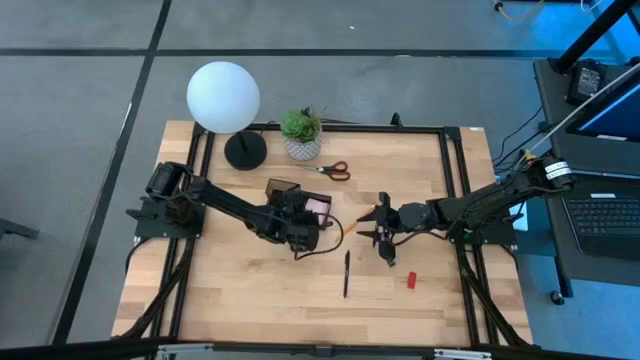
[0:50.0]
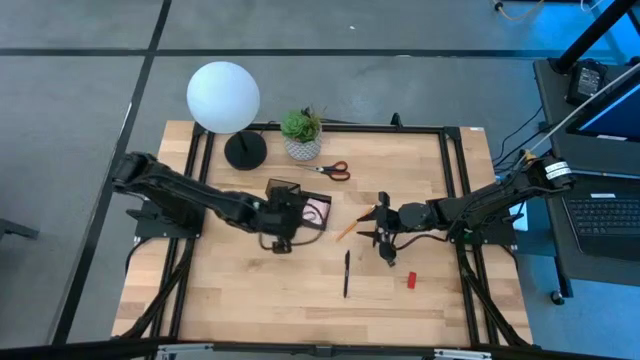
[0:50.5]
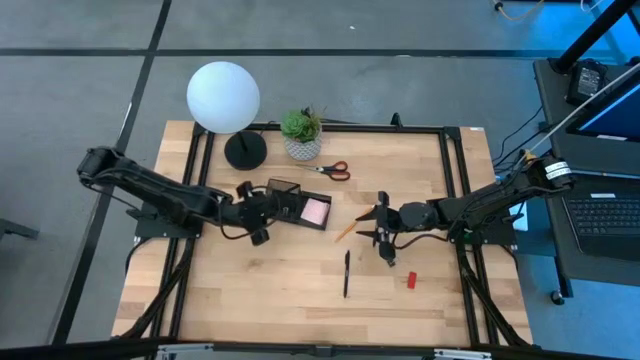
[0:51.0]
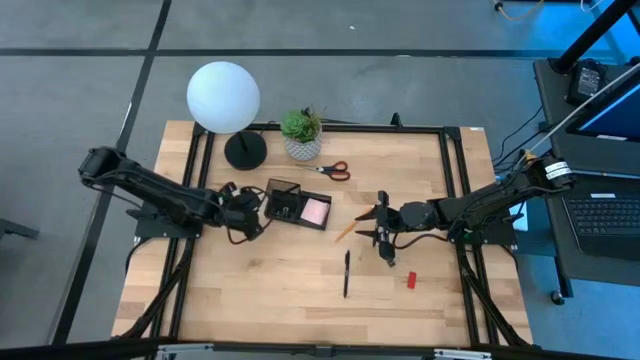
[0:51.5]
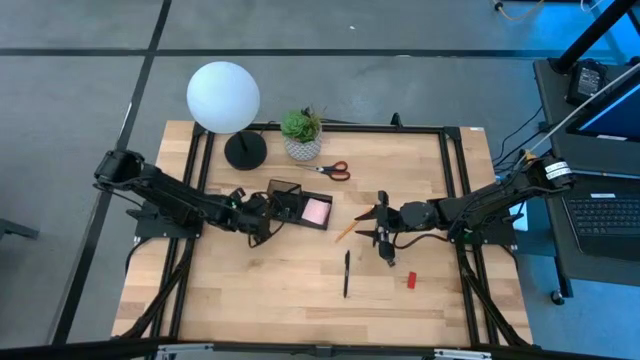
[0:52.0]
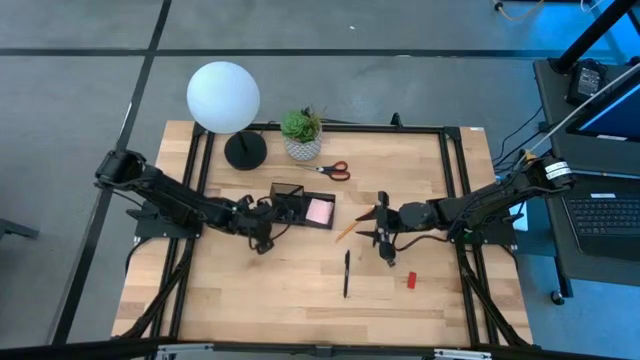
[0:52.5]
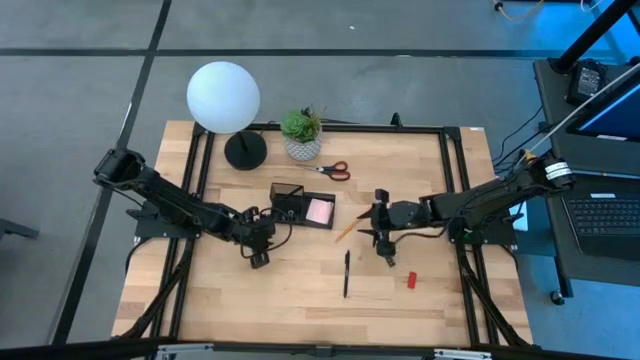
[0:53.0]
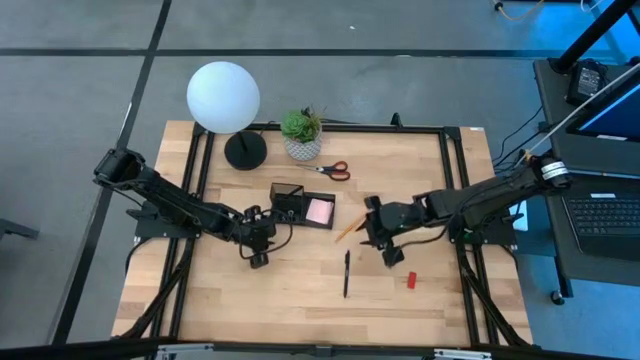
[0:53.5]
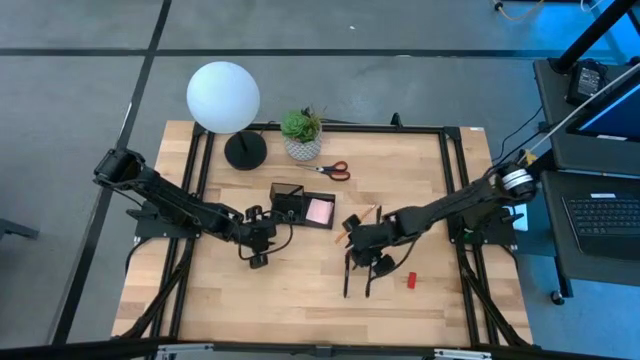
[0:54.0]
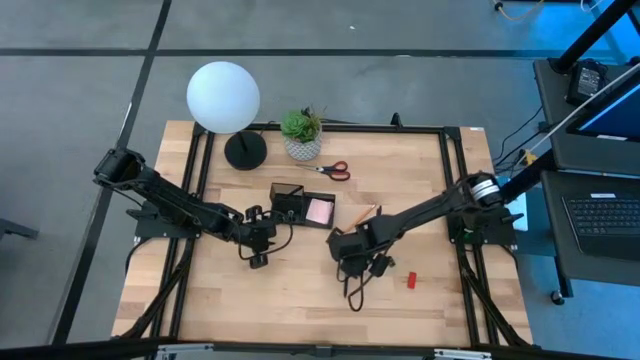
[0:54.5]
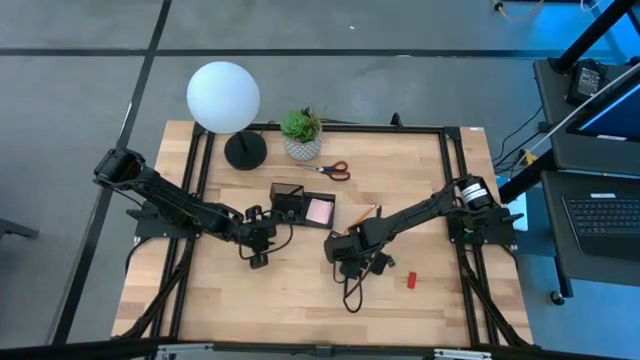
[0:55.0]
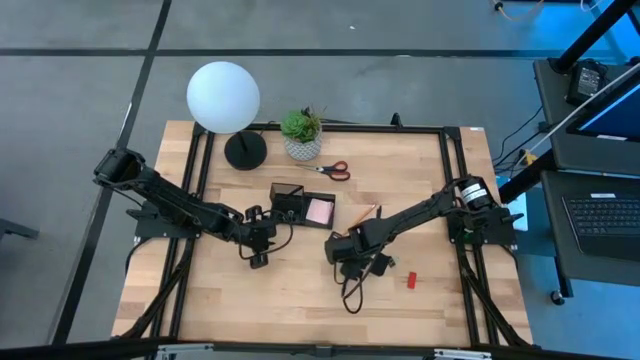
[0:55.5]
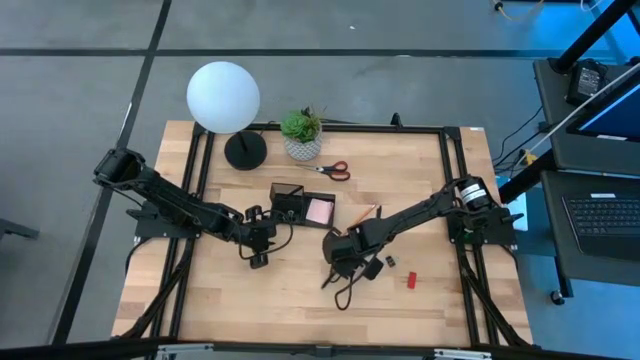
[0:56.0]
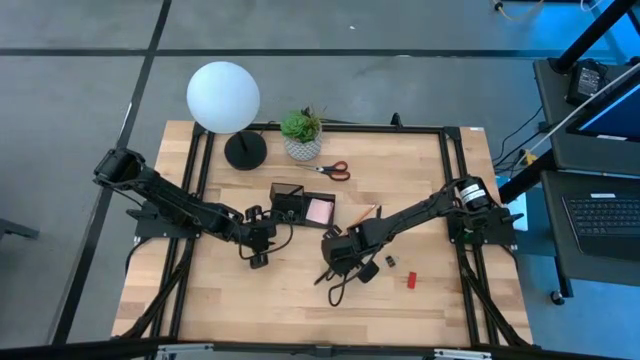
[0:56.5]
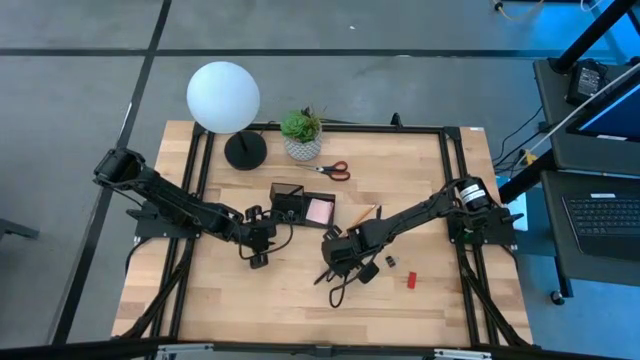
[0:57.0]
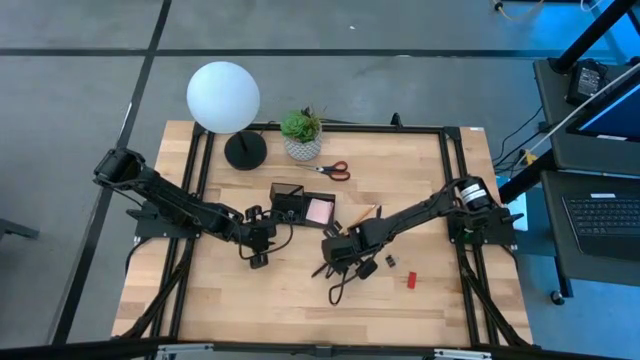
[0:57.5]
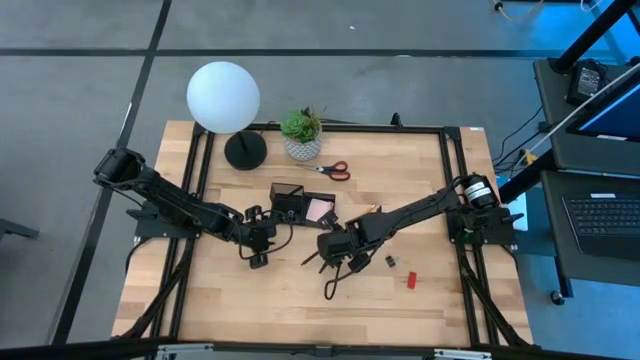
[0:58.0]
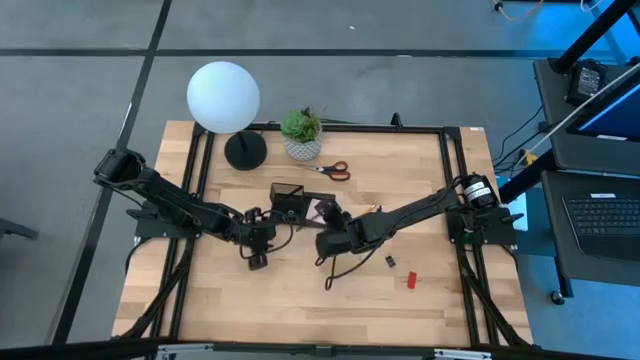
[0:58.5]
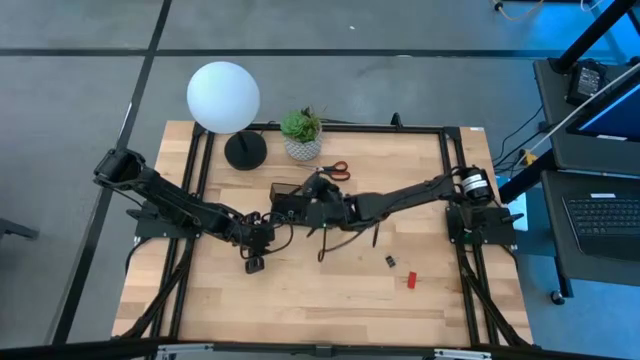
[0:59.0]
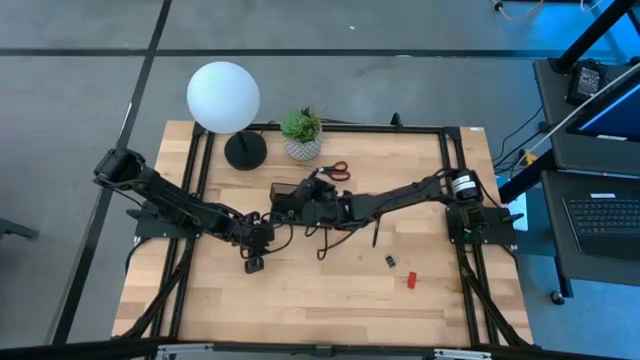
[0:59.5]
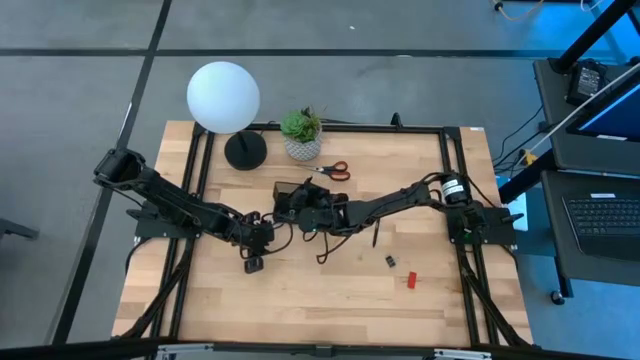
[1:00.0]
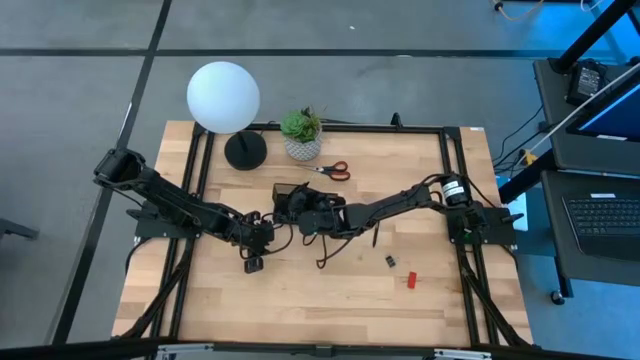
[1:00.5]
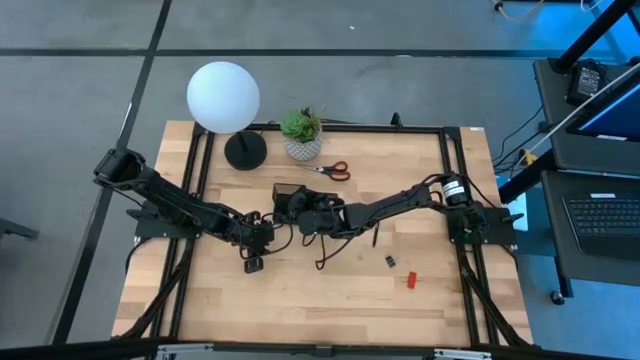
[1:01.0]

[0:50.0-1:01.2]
Task: Pick and place office supplies into organizer
Put the black pen into the black desk organizer

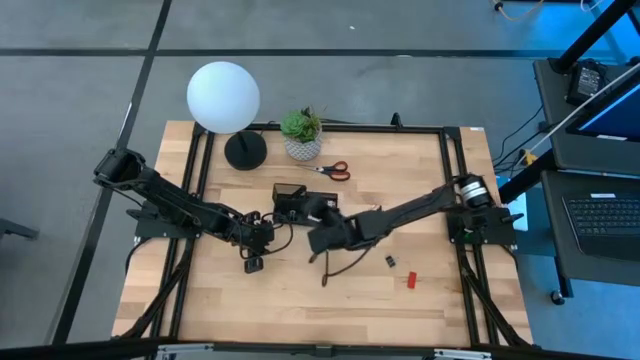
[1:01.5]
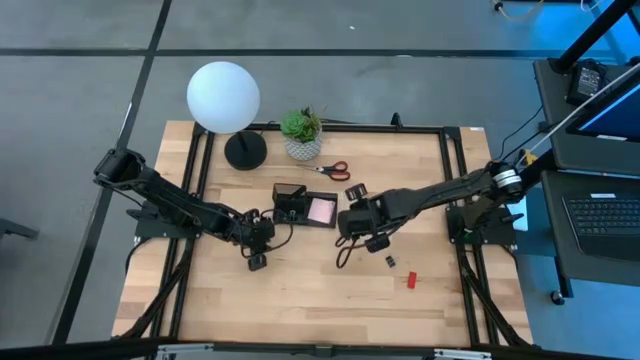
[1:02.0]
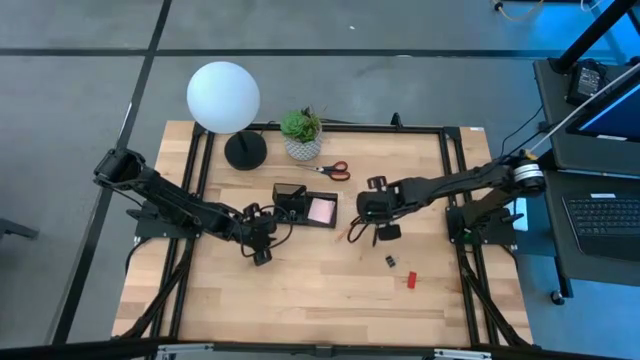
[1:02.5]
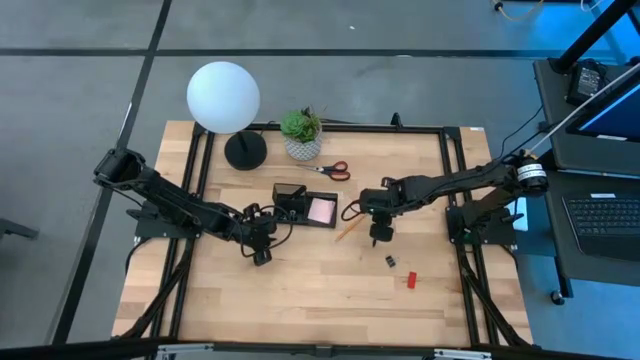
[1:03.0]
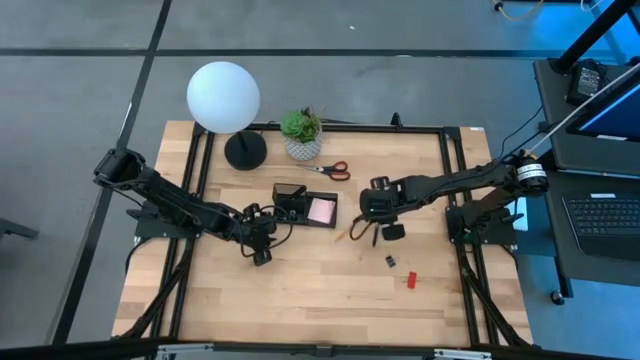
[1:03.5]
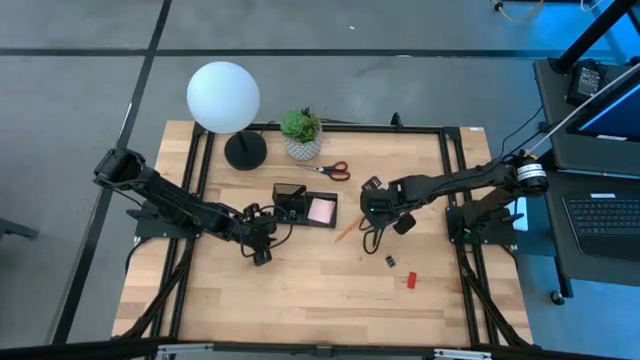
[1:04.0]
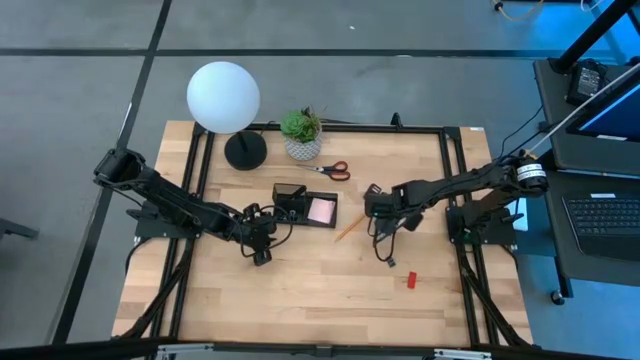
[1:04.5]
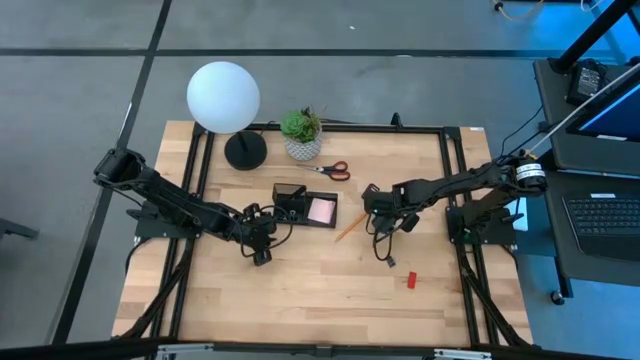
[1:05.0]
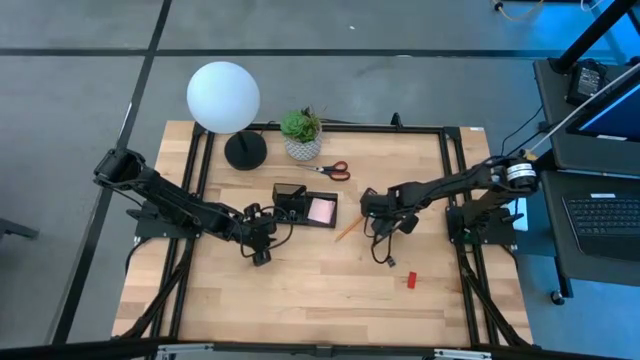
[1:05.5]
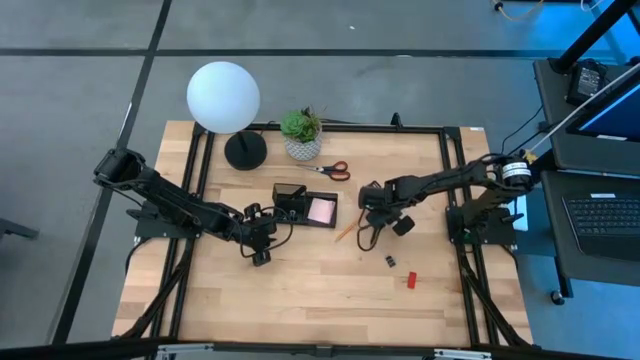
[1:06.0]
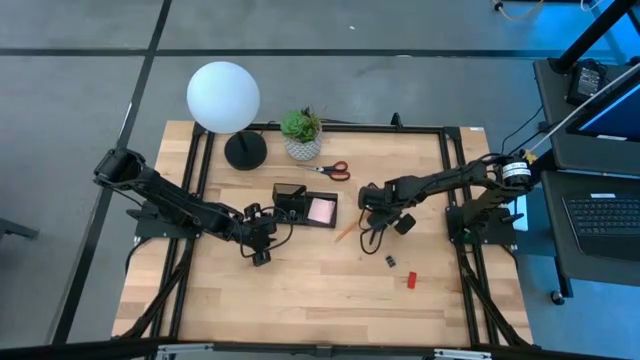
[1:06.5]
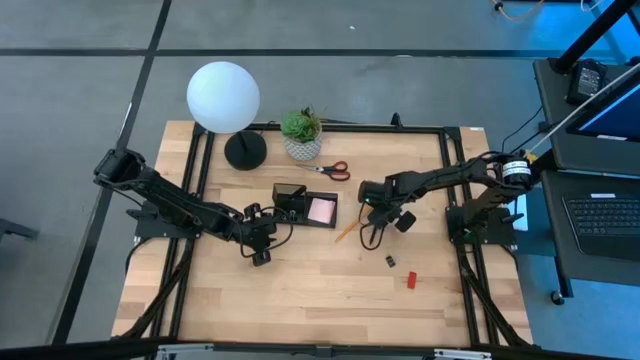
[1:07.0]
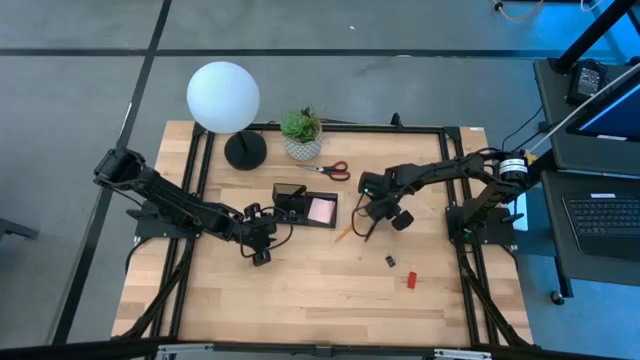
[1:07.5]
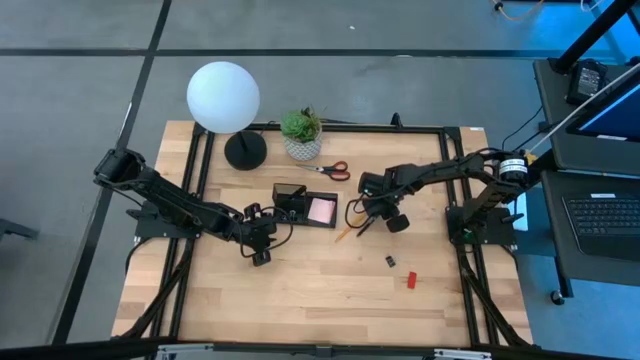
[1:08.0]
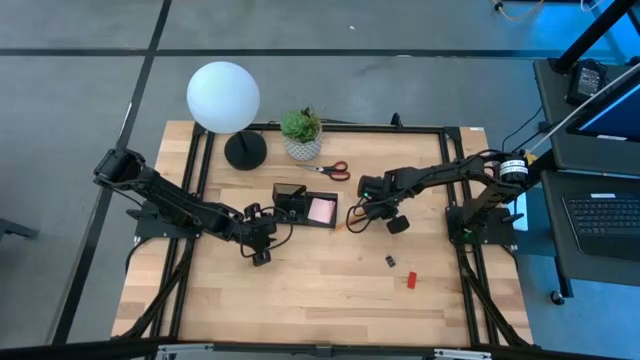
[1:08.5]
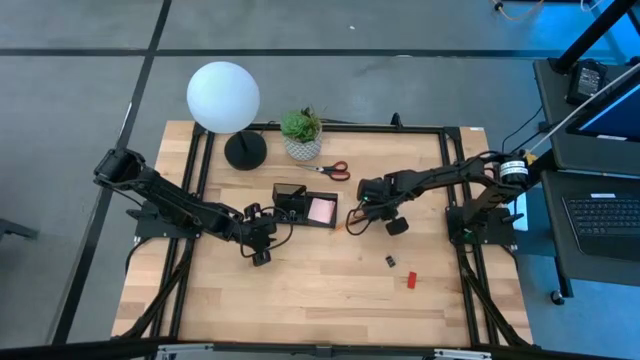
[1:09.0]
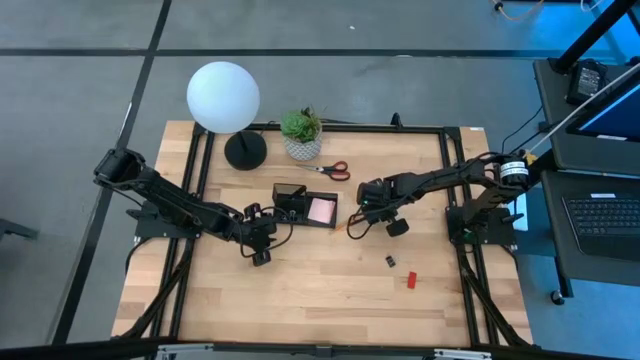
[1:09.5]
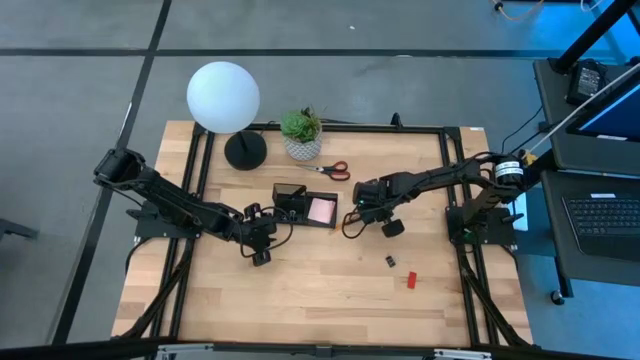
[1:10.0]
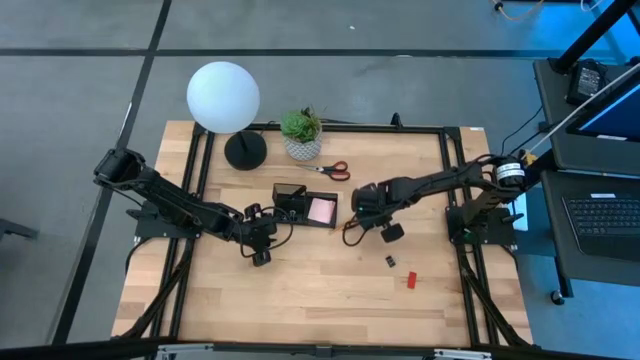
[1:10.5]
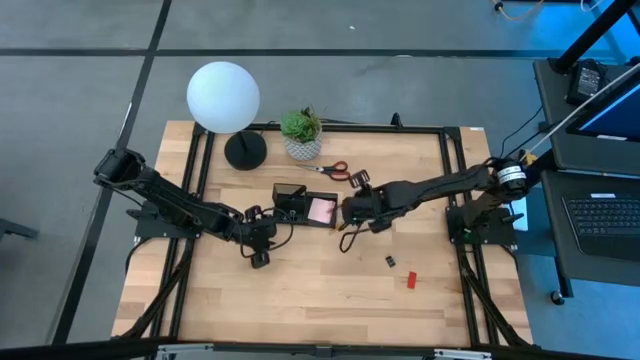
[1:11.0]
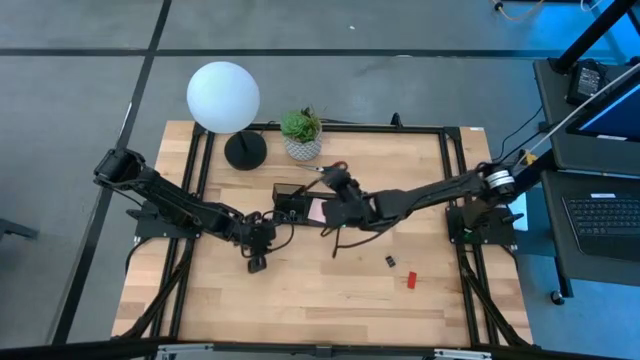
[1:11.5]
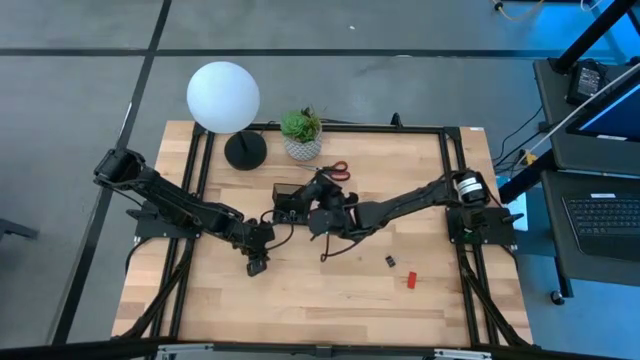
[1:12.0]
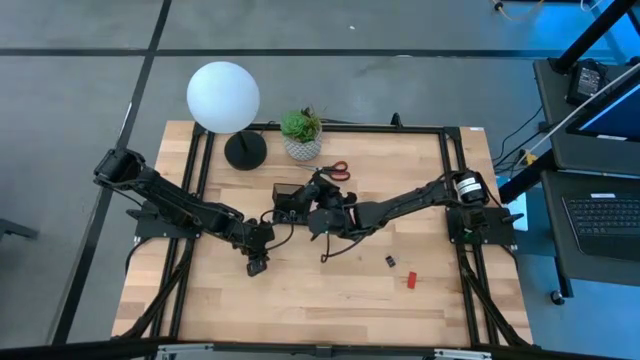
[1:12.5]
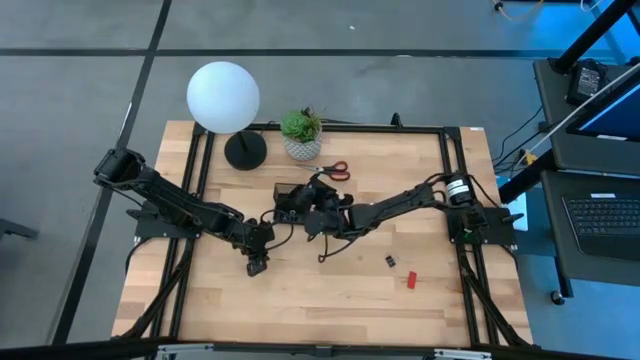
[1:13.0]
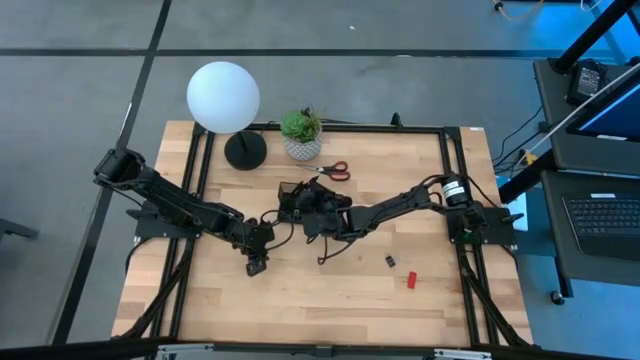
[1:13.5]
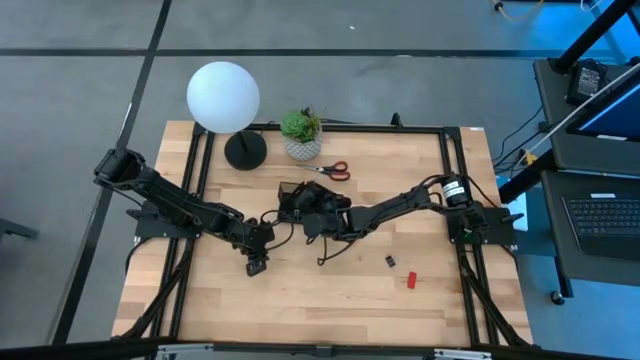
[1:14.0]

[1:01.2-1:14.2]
Put the black pen into the black desk organizer
